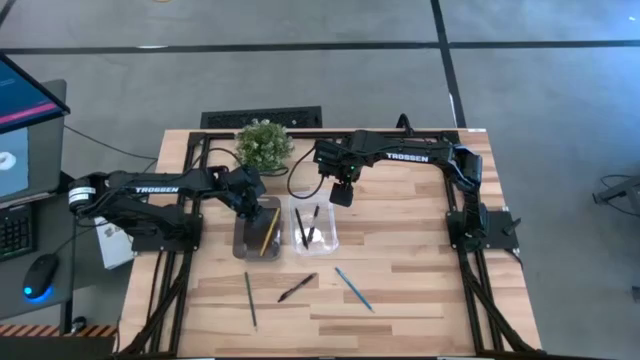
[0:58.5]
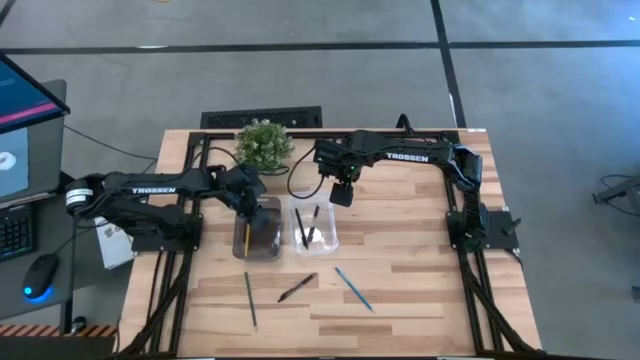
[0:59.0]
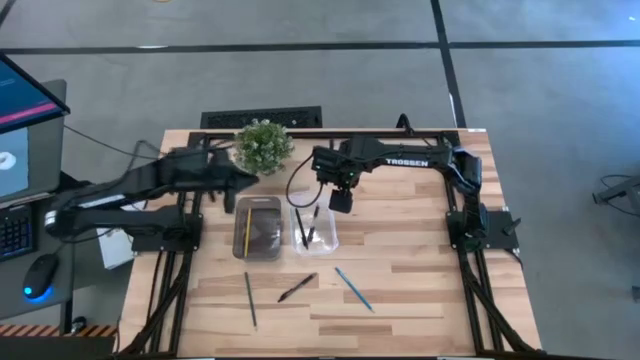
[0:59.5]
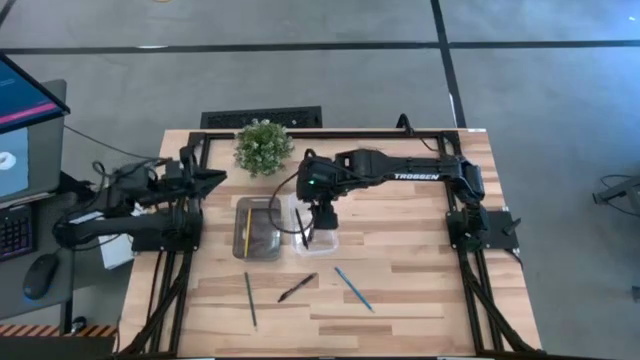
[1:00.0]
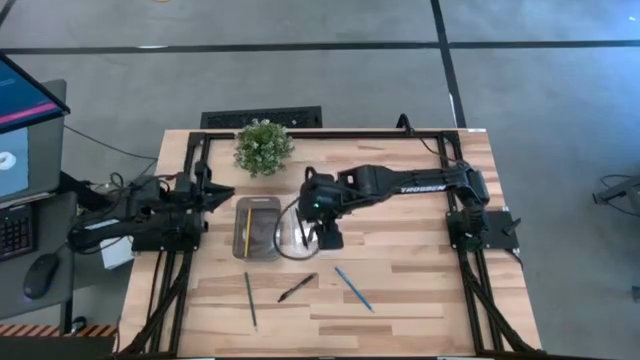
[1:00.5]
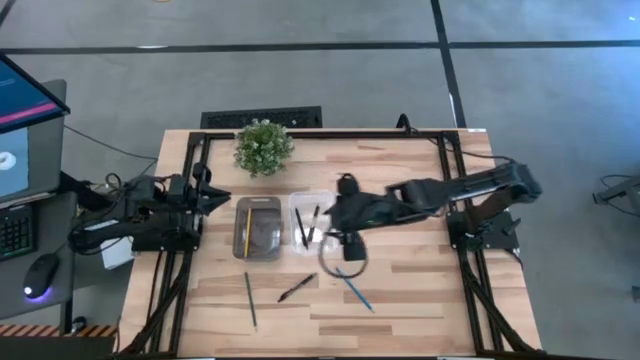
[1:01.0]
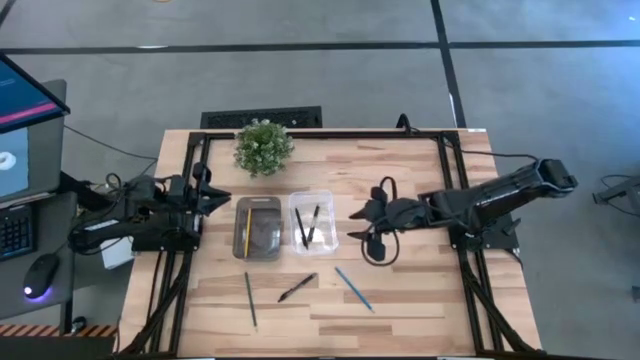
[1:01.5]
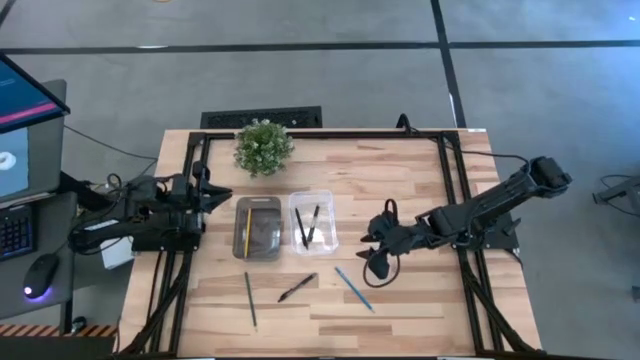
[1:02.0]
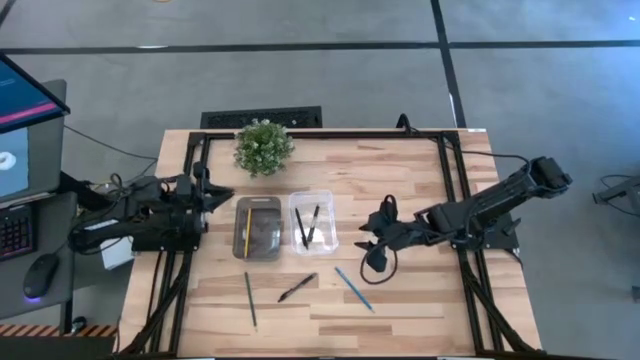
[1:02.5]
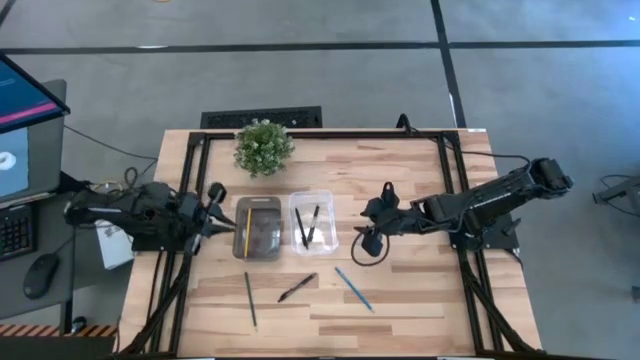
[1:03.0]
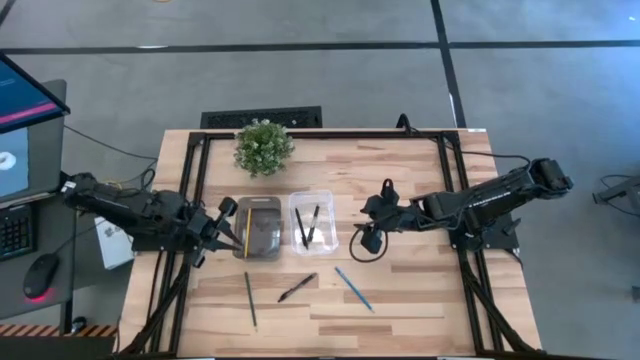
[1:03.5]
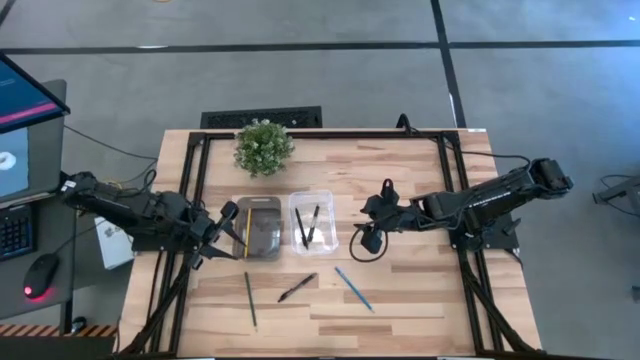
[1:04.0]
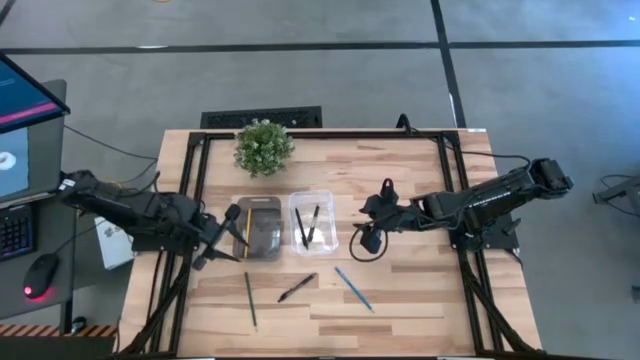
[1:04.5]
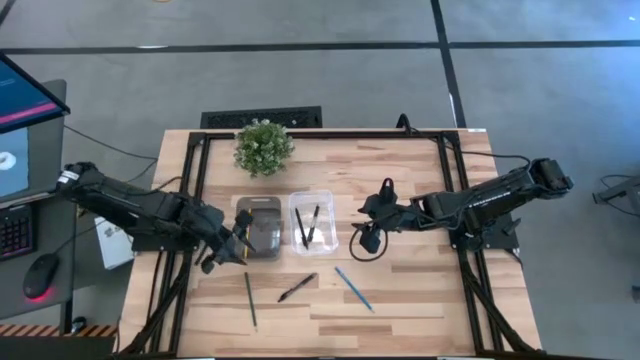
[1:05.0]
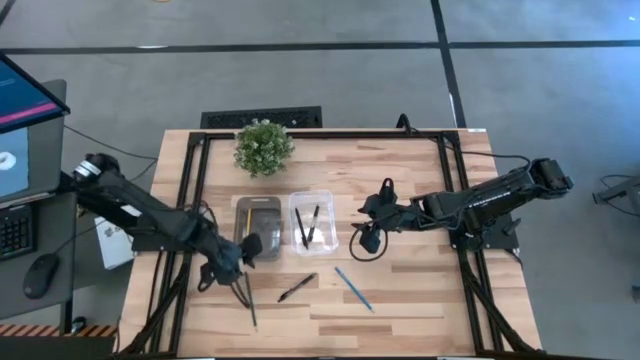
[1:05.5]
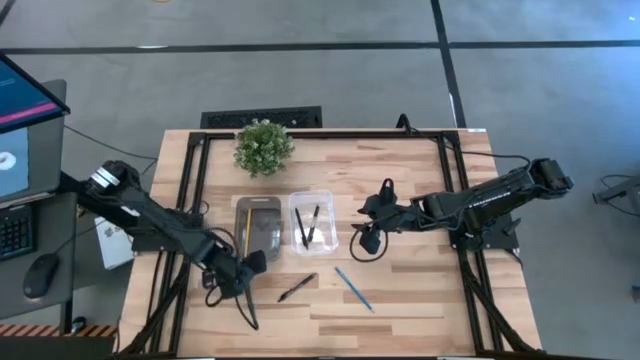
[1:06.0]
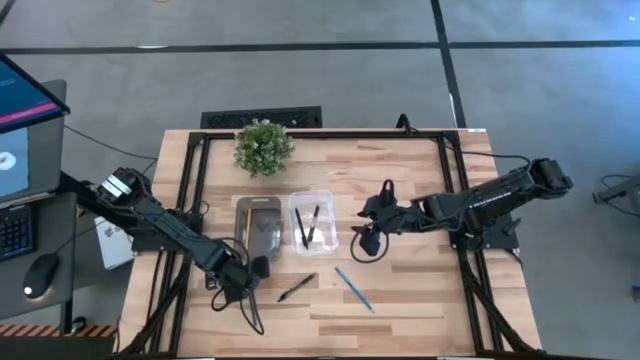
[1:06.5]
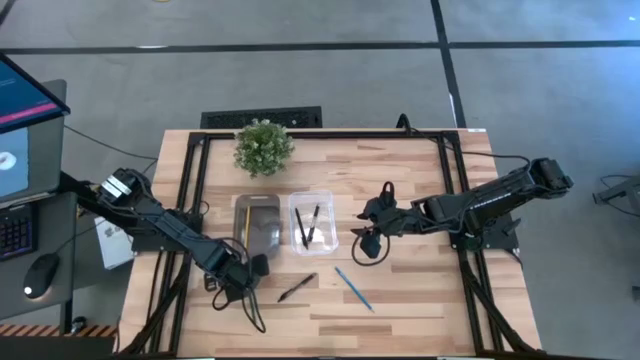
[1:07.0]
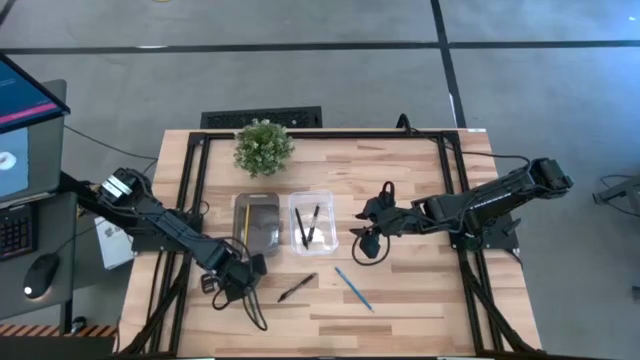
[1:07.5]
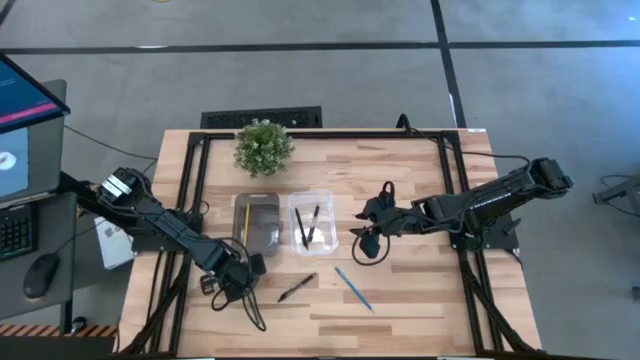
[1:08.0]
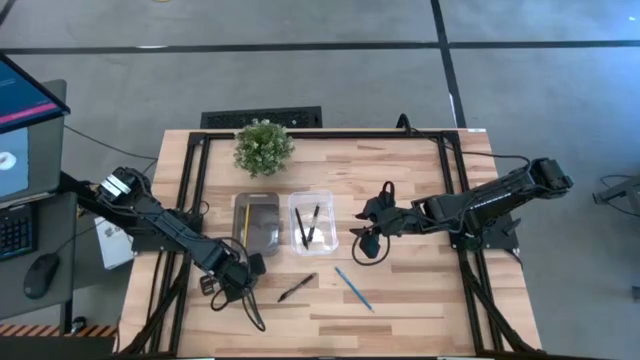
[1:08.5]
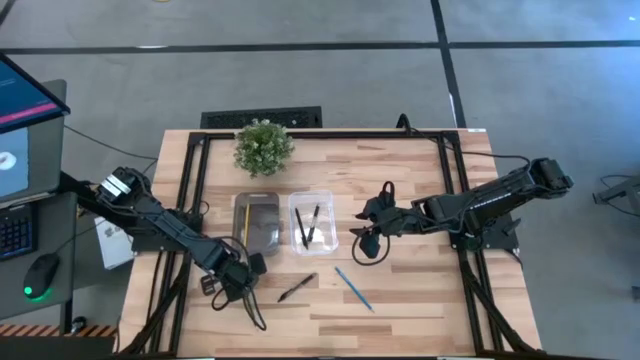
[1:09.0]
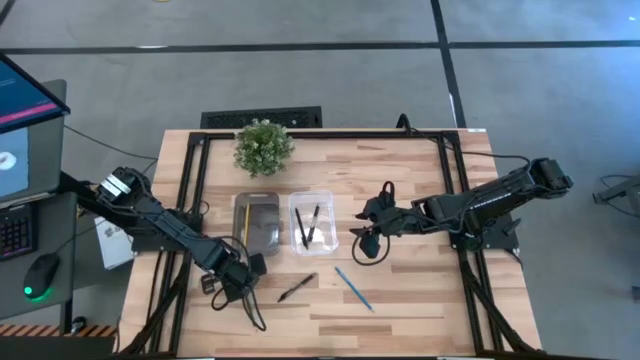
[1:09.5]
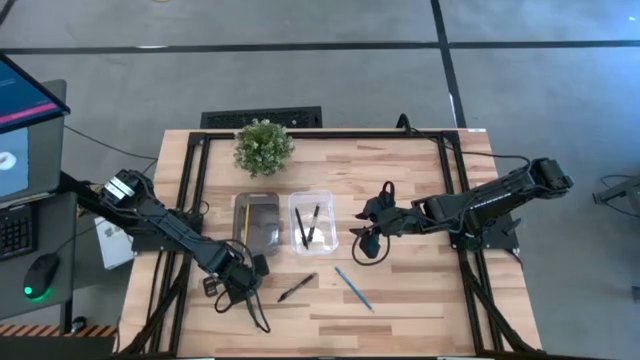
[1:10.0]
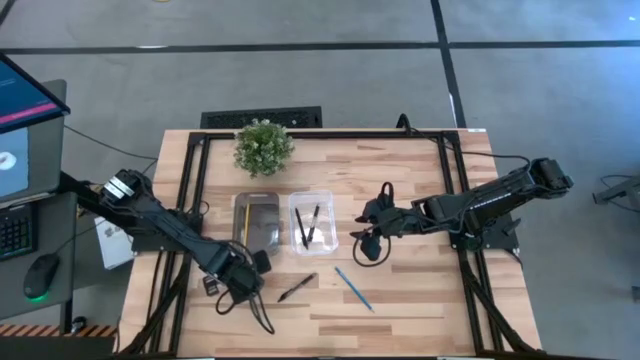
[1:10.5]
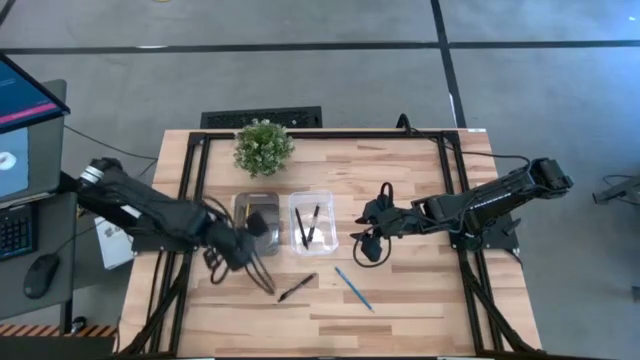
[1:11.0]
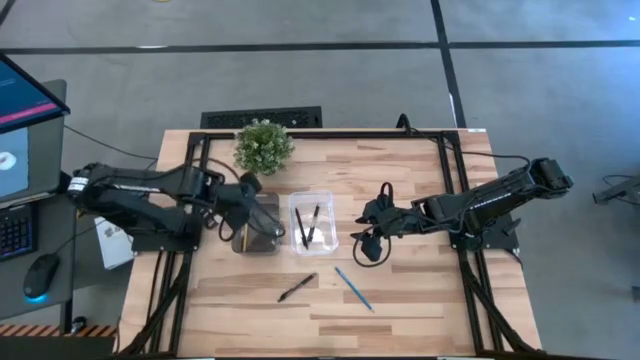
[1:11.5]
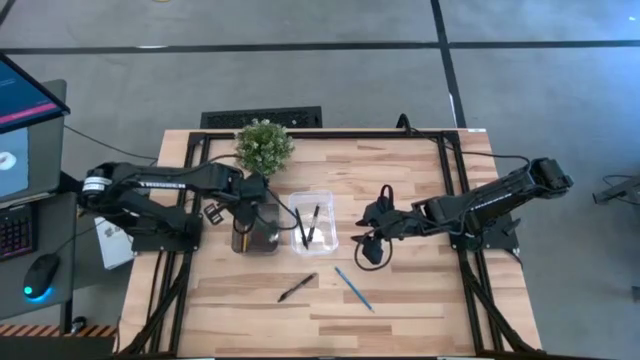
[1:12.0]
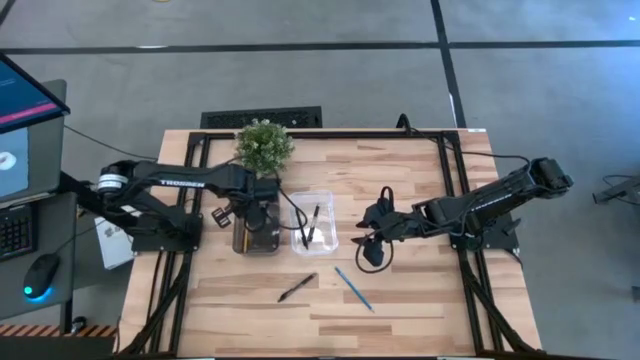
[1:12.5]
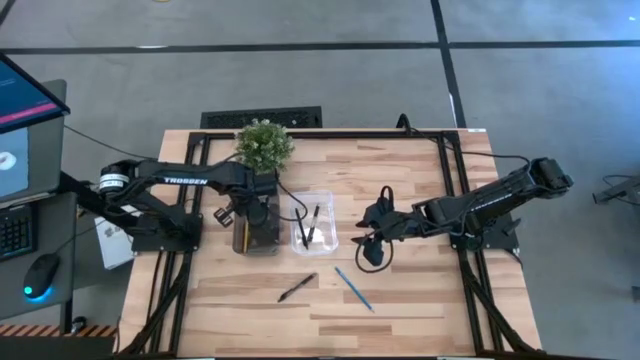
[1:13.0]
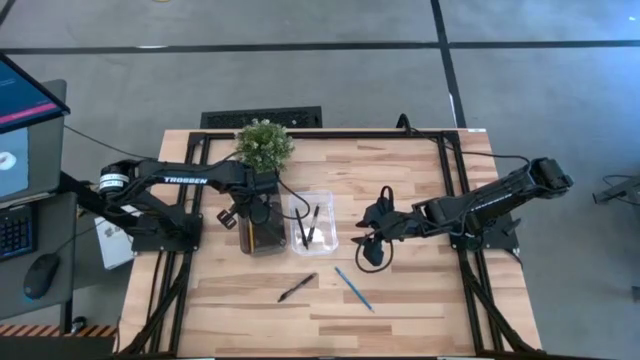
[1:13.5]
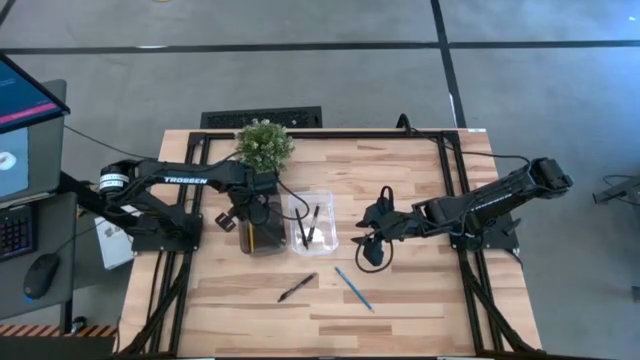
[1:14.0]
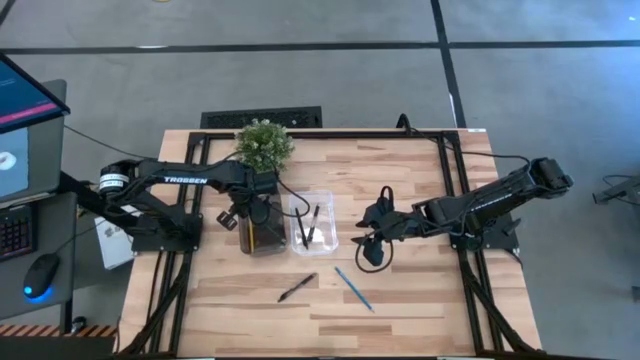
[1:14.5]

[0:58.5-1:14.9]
Task: Sort pens & pencils
Put the green pencil into the black bin

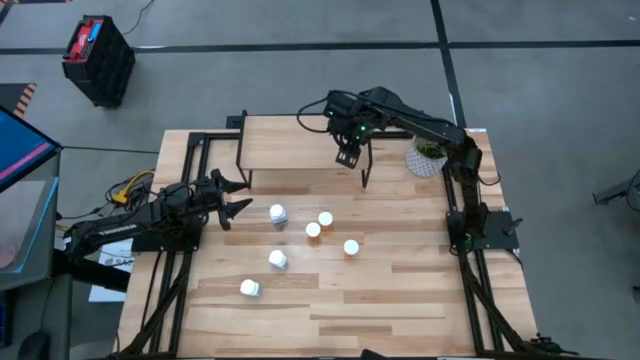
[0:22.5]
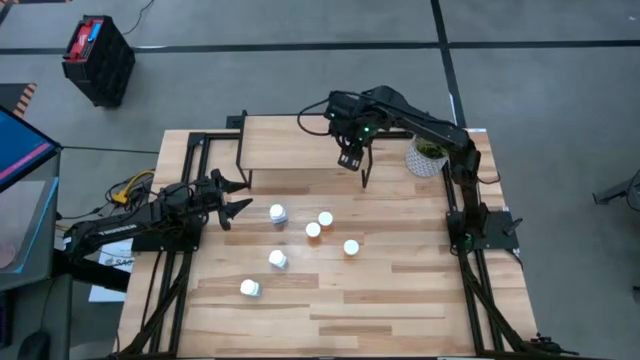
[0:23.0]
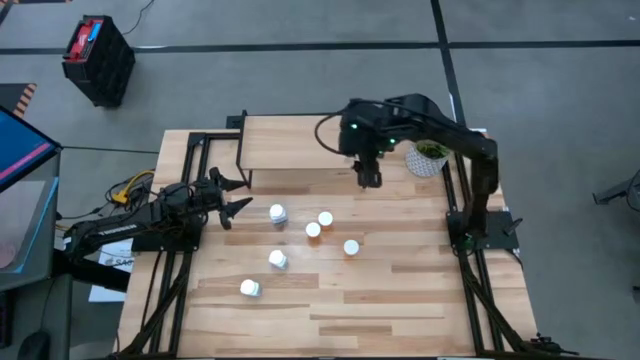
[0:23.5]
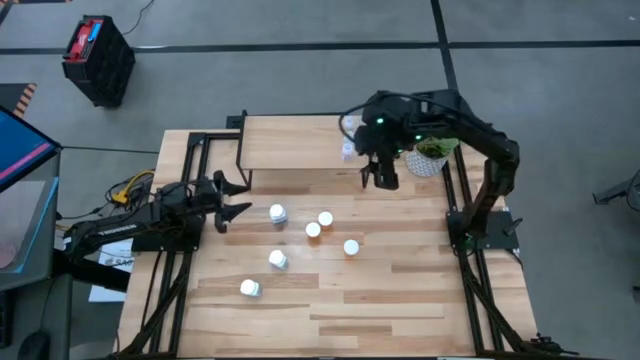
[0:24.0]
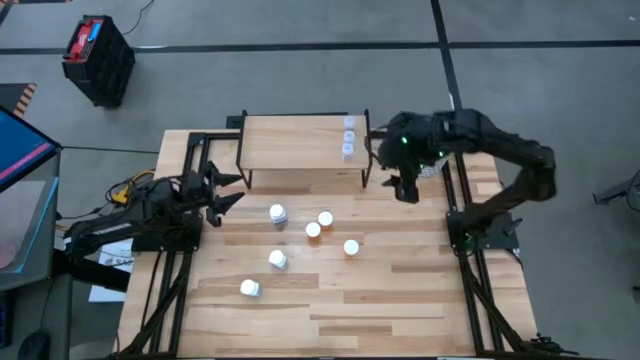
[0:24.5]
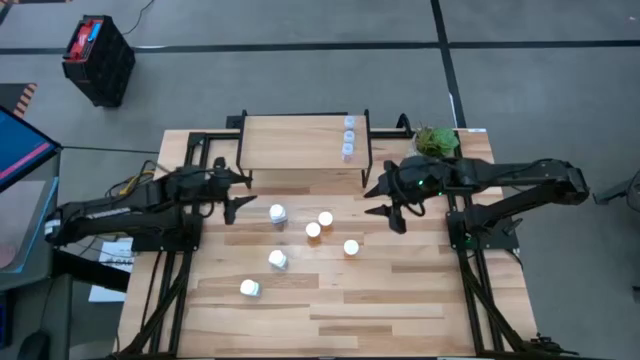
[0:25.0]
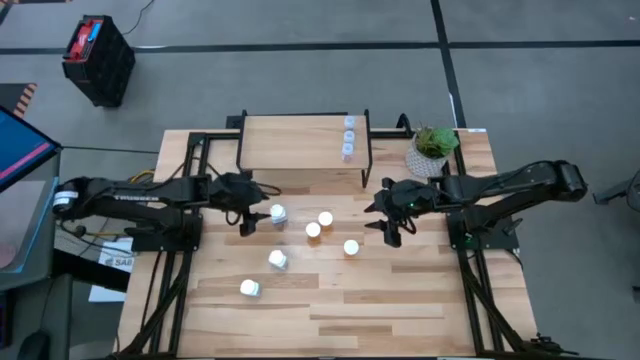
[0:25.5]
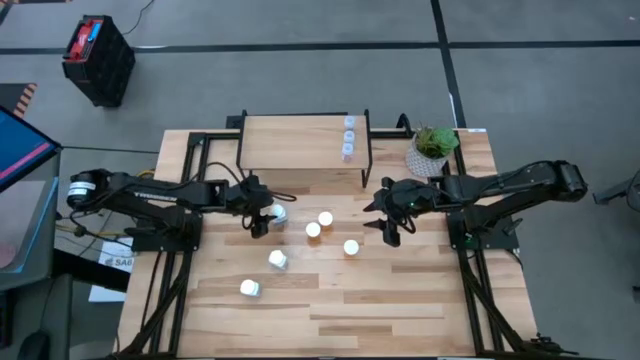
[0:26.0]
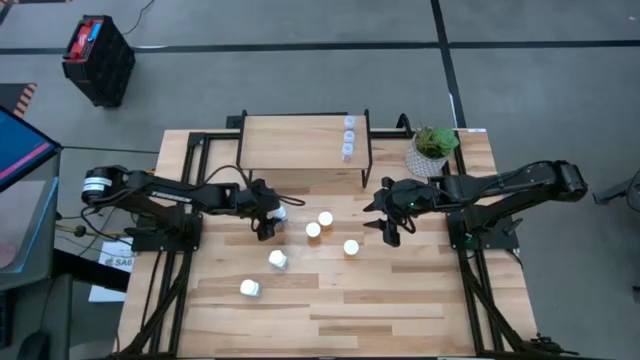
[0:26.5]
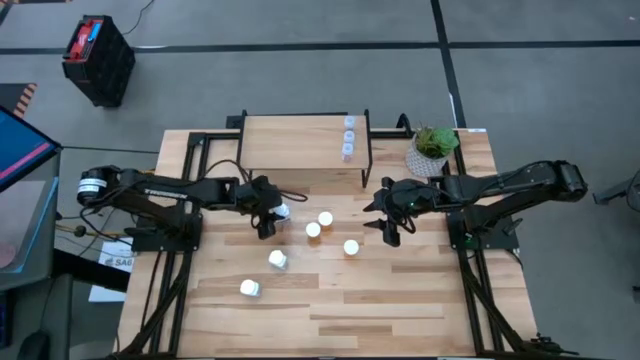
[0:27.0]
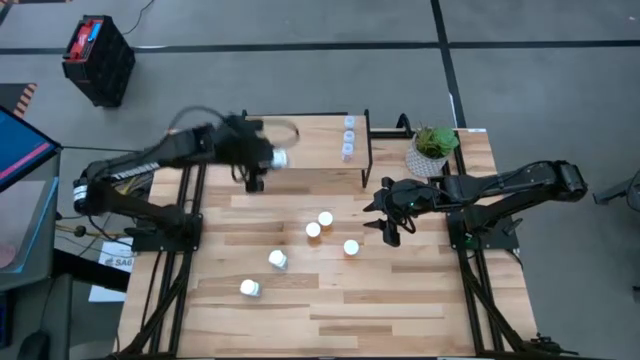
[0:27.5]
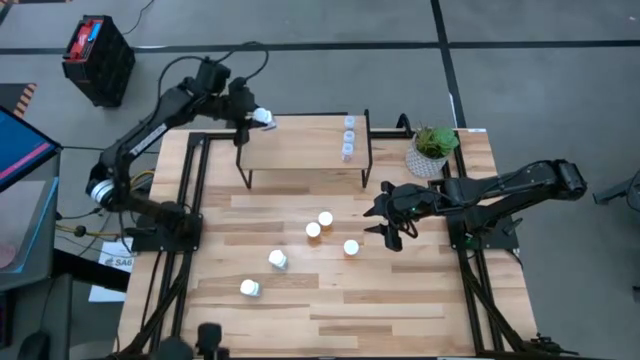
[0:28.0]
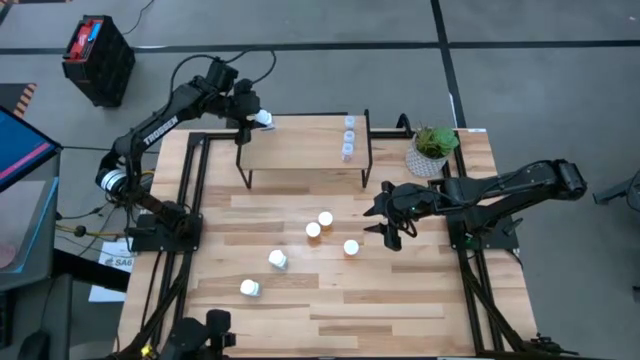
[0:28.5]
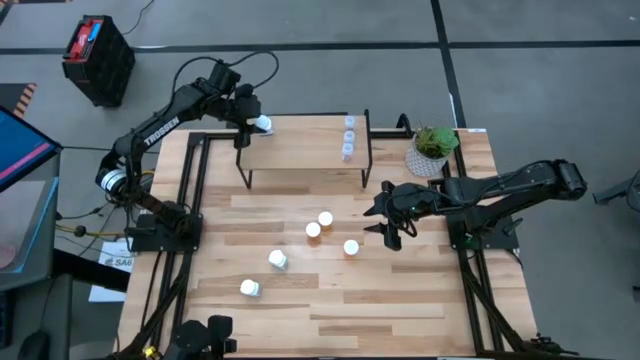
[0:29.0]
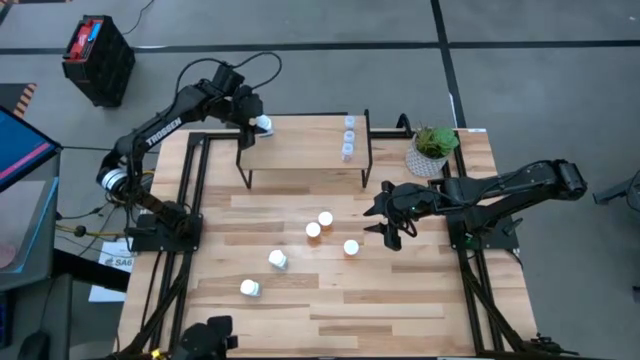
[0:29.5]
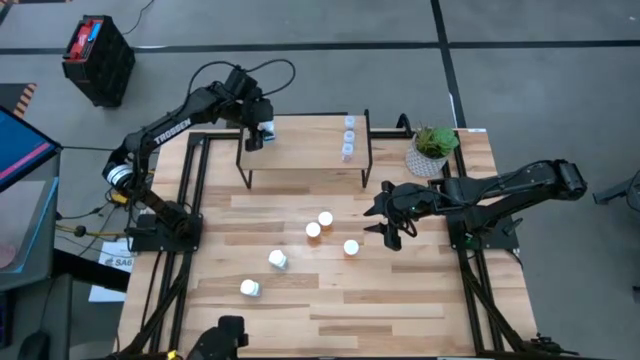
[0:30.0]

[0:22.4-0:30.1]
Task: Pick and place medicine bottles onto shelf by color
Put the top white pill bottle on the shelf
